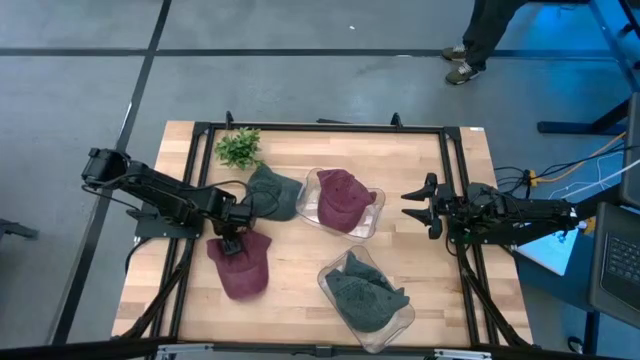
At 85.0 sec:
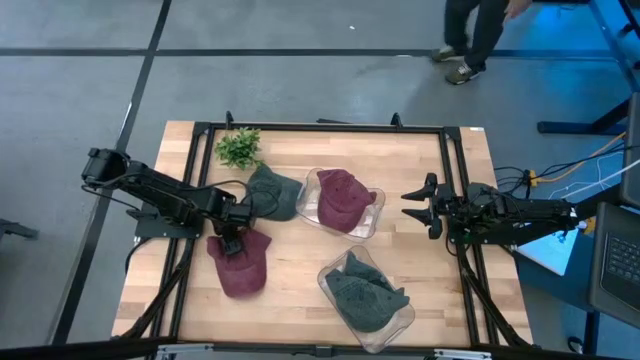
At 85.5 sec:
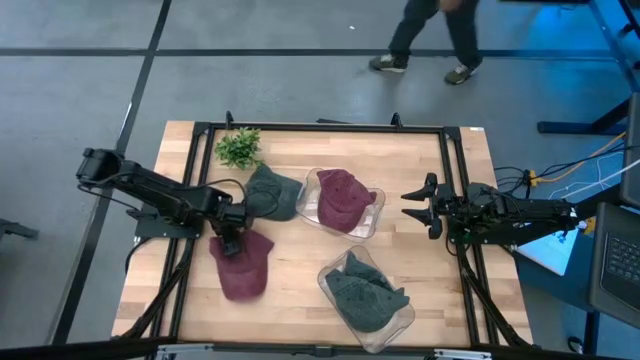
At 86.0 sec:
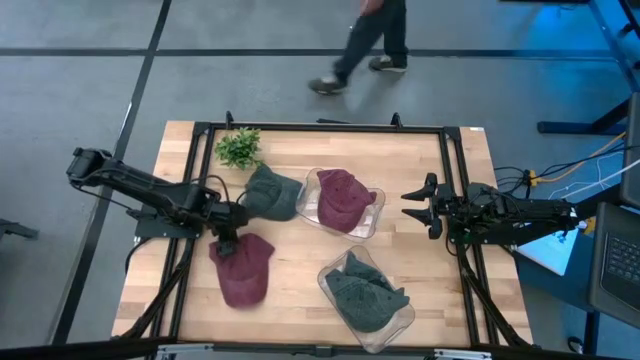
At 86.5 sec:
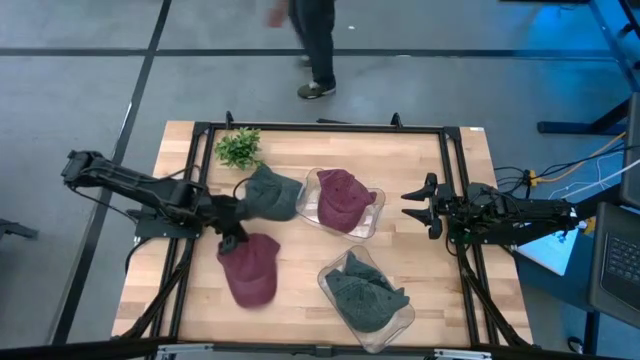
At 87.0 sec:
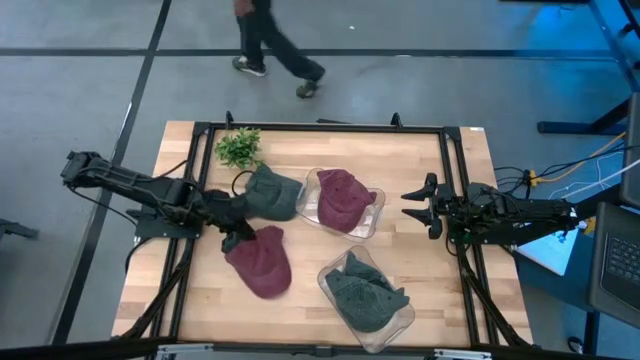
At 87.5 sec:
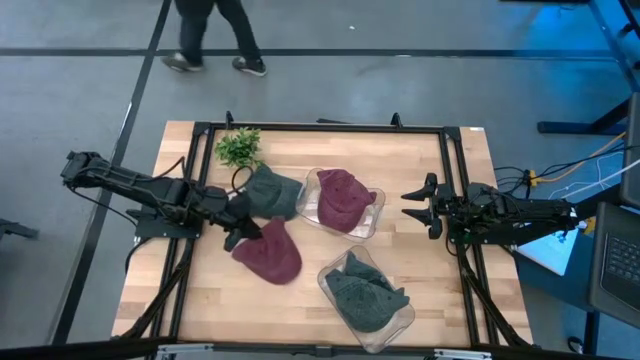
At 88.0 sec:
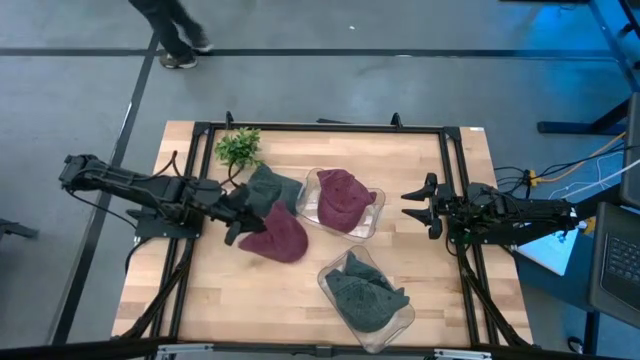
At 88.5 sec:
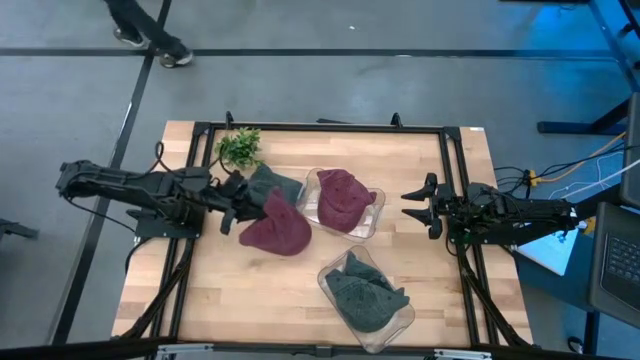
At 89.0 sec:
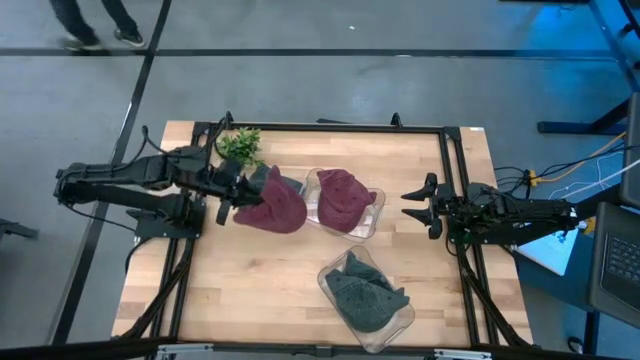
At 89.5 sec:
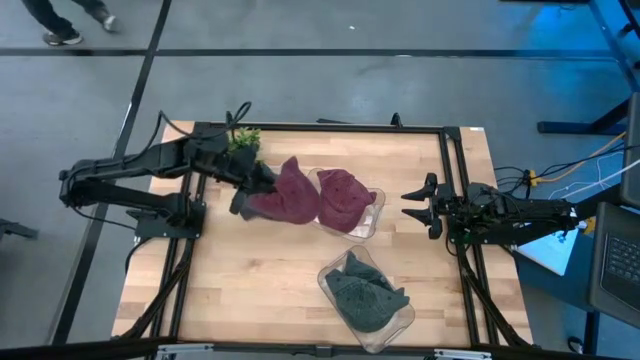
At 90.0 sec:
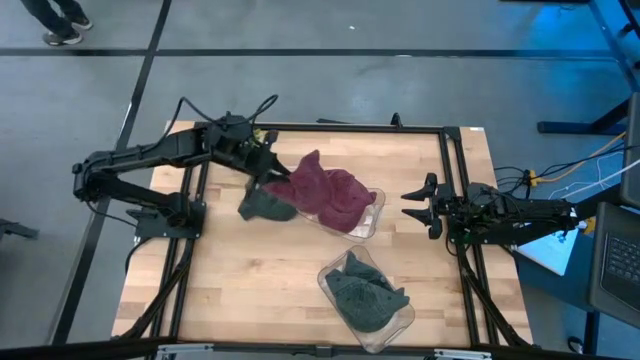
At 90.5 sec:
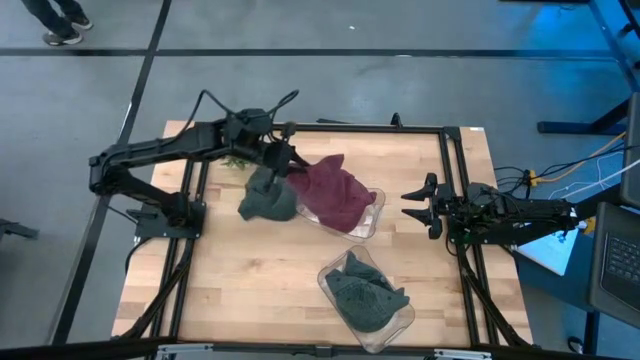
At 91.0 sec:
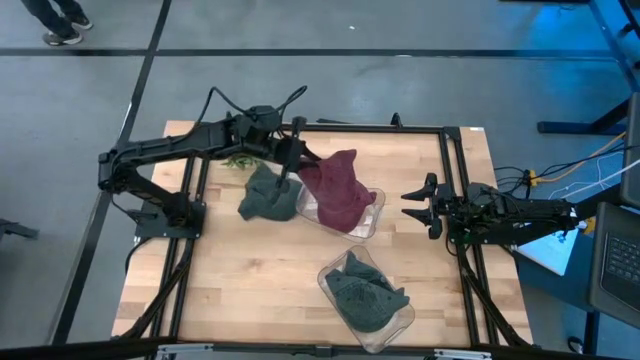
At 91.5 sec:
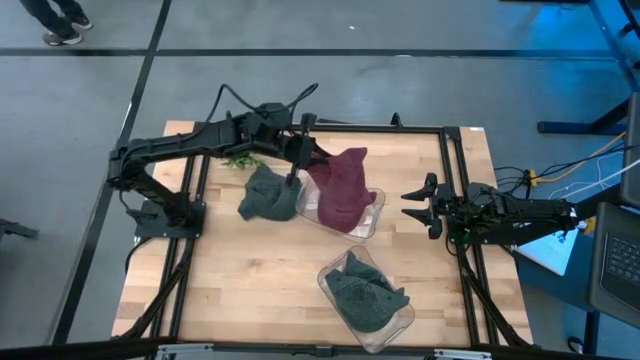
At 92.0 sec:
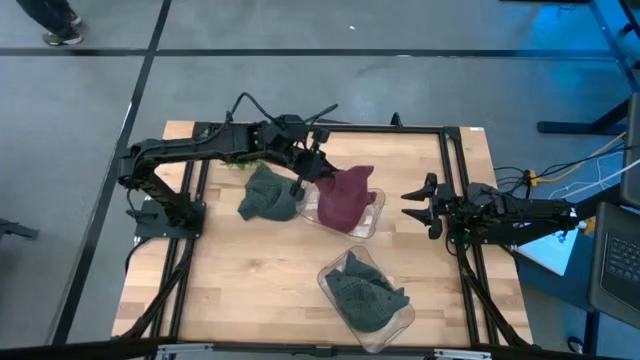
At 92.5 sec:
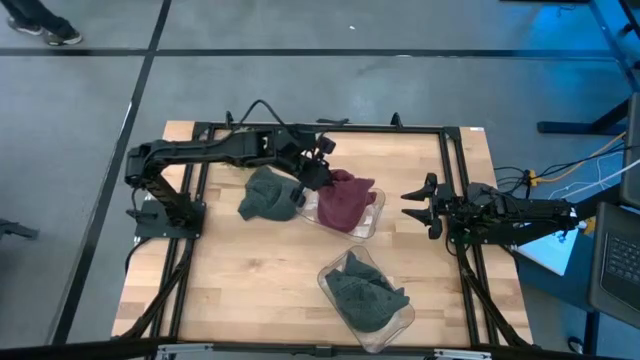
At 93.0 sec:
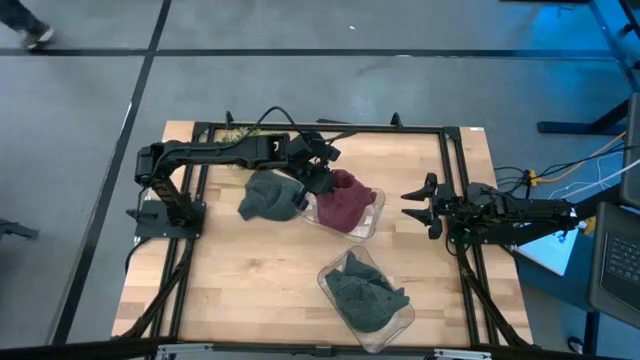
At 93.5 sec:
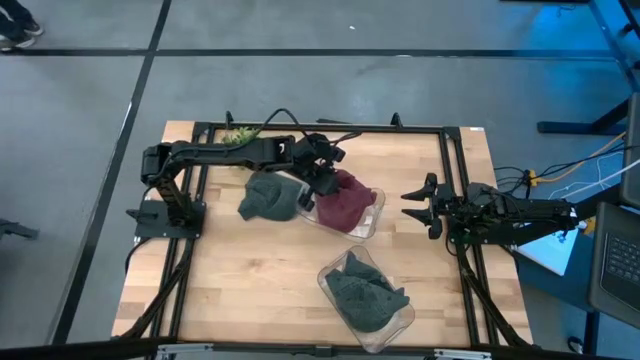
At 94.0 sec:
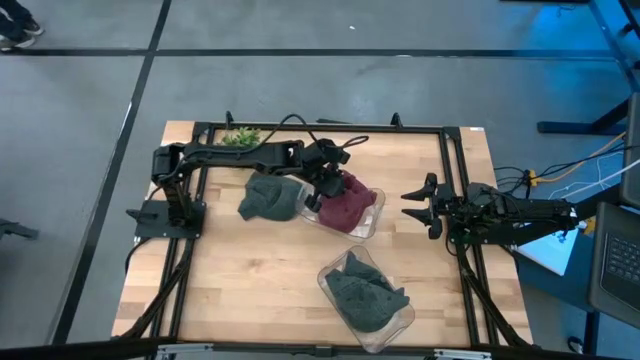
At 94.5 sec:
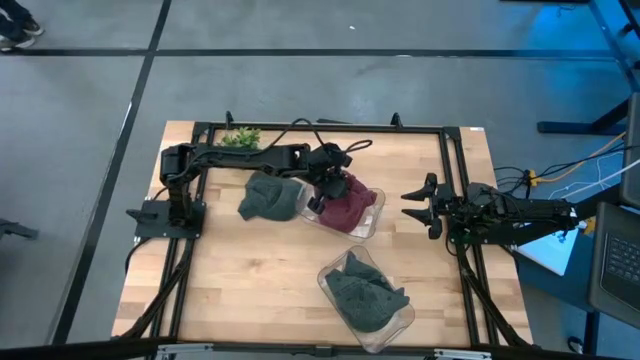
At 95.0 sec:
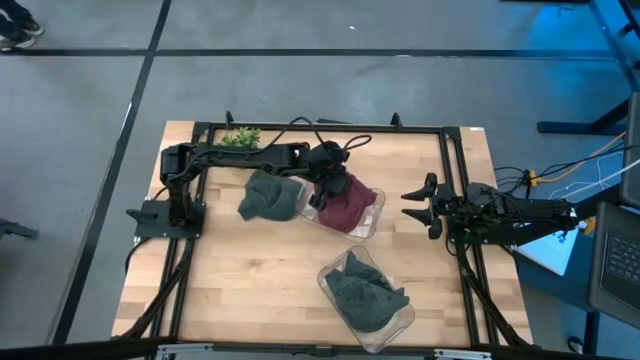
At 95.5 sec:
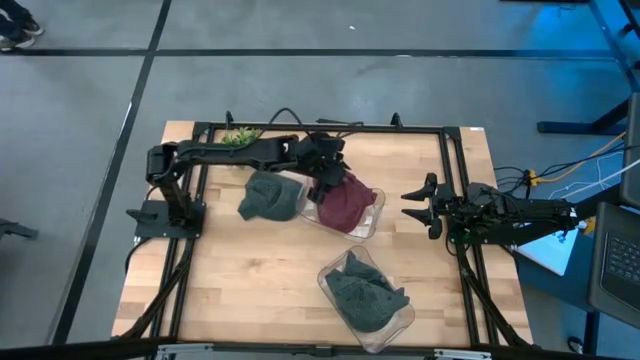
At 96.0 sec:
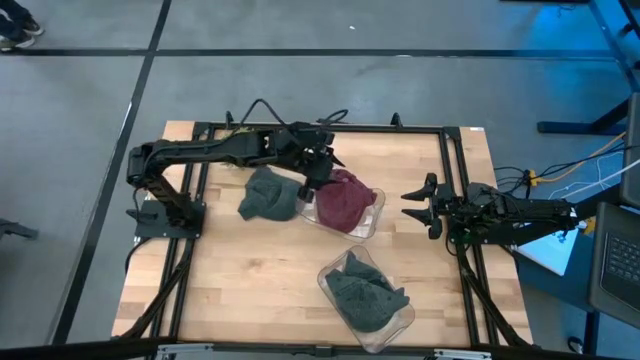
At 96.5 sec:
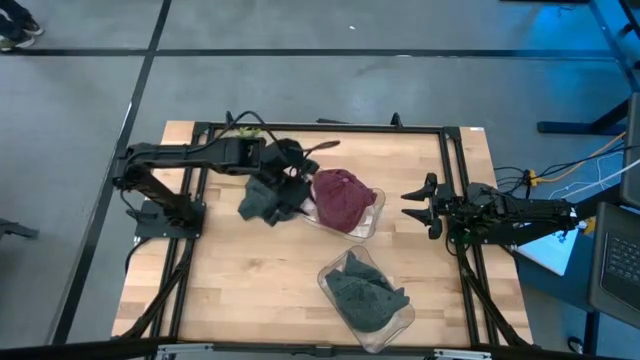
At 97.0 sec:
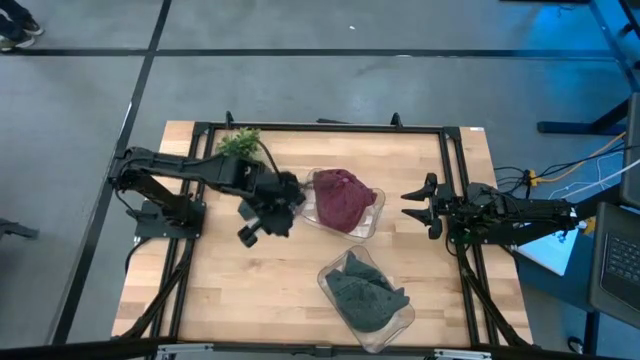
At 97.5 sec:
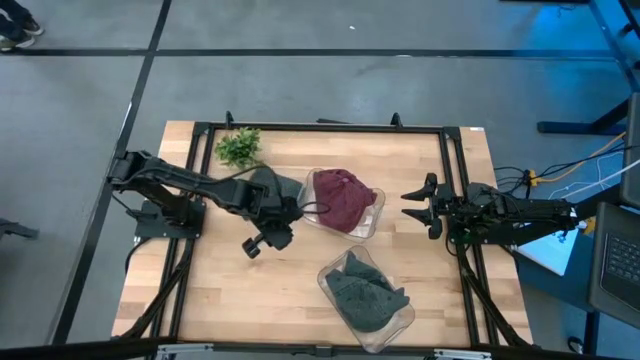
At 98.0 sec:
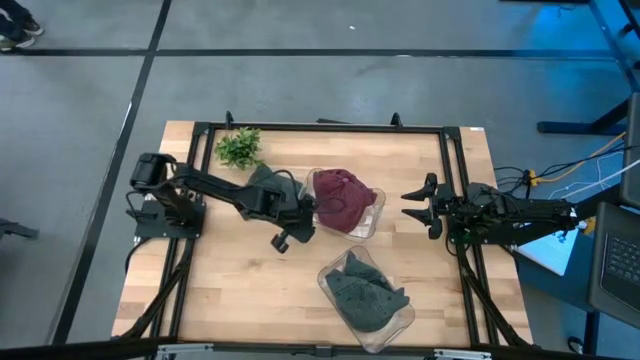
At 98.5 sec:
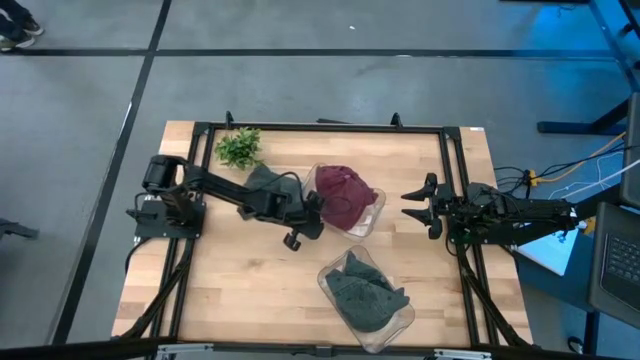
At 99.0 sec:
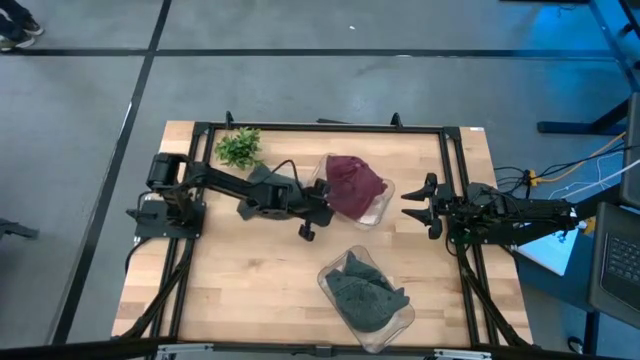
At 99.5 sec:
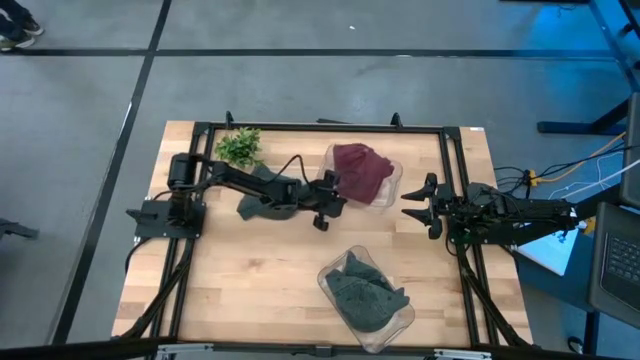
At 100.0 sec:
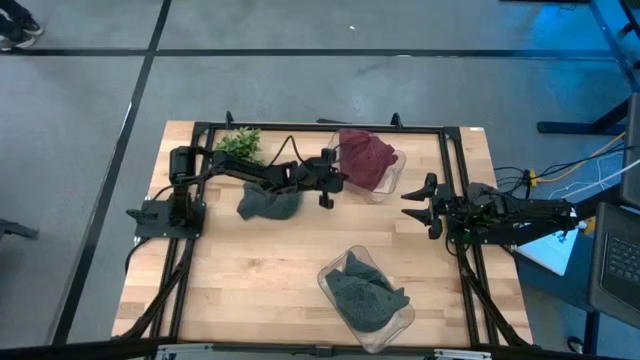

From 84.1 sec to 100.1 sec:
Task: Pick & Place hat
Put the red cap into the top transparent bin

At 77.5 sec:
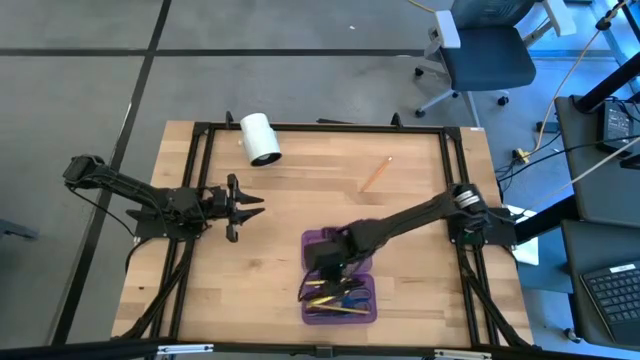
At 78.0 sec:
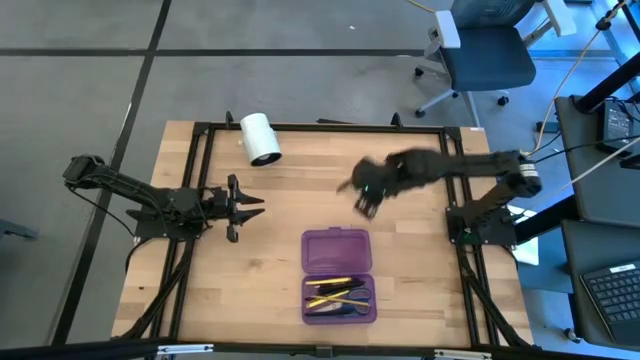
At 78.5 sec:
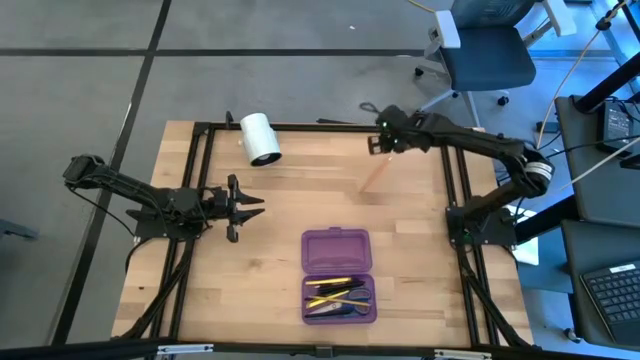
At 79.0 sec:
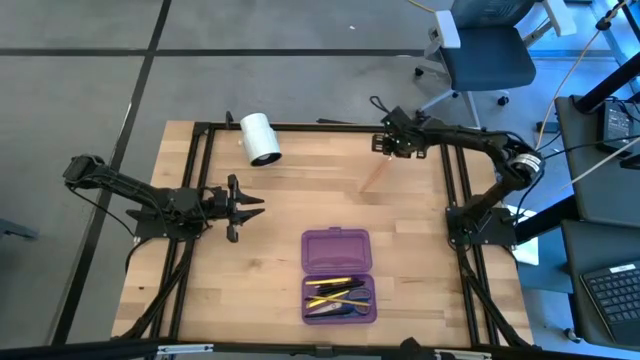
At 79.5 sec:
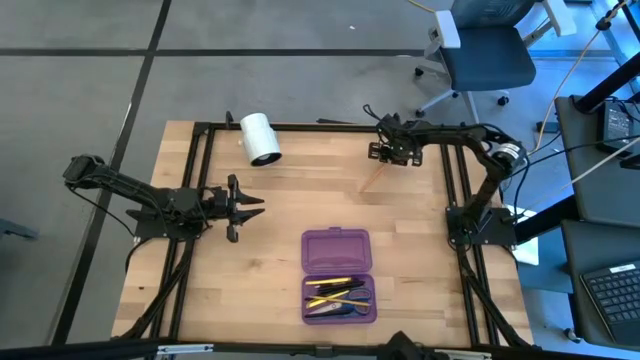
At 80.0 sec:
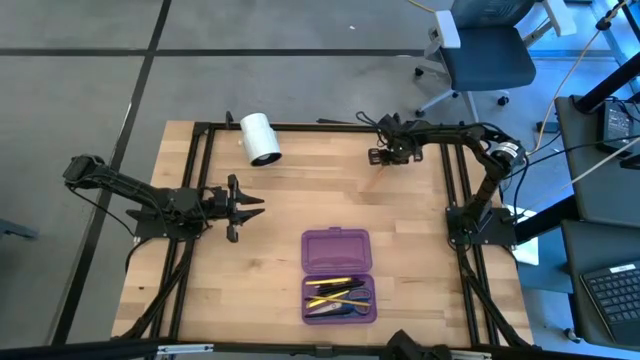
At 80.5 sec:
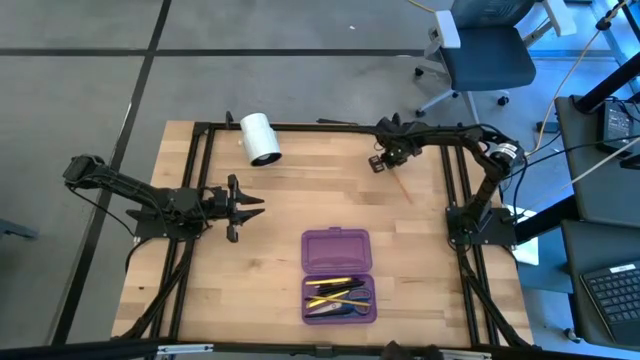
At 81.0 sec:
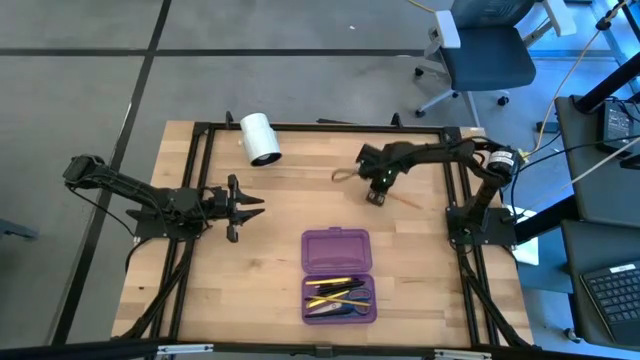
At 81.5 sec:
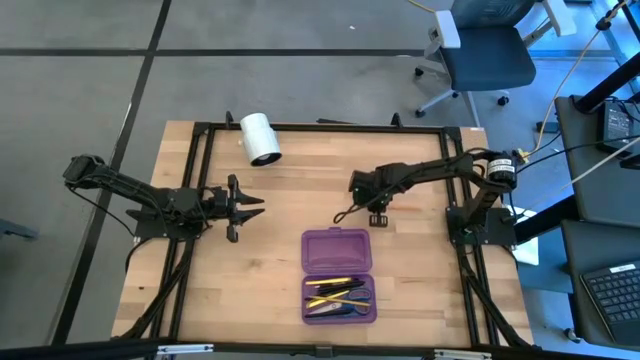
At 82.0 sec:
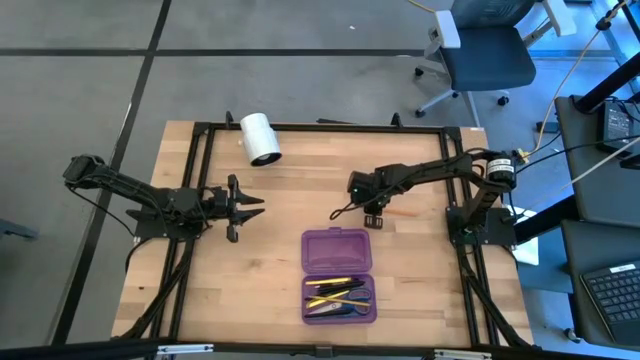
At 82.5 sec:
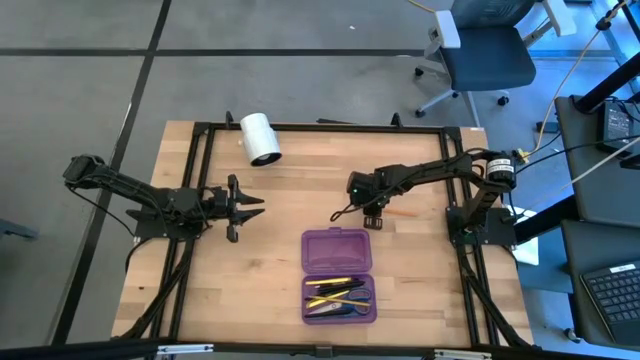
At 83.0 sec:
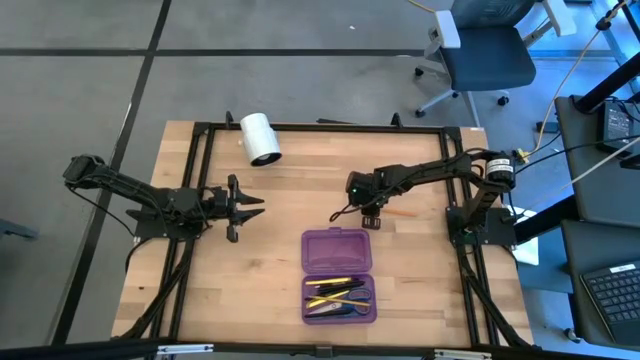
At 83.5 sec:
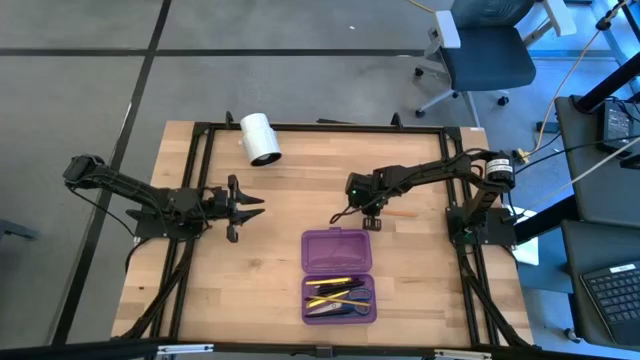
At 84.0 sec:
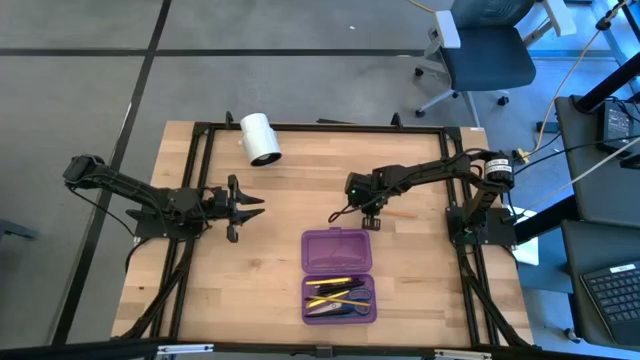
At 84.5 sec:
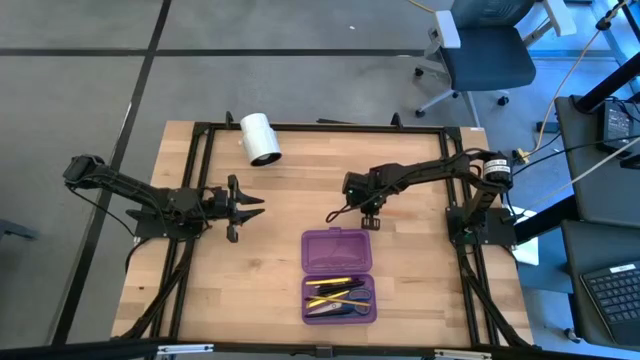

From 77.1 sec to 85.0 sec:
Task: Pick & place school supplies into a supply box
Put the orange pencil into the purple supply box
